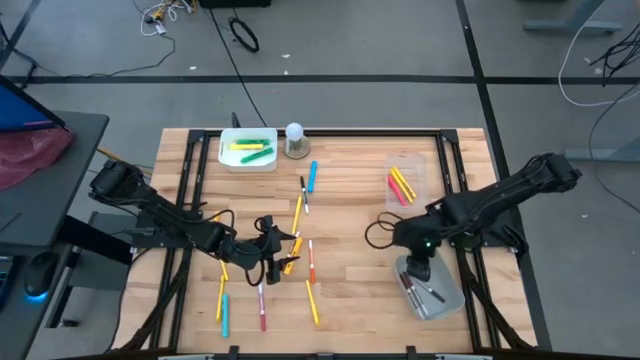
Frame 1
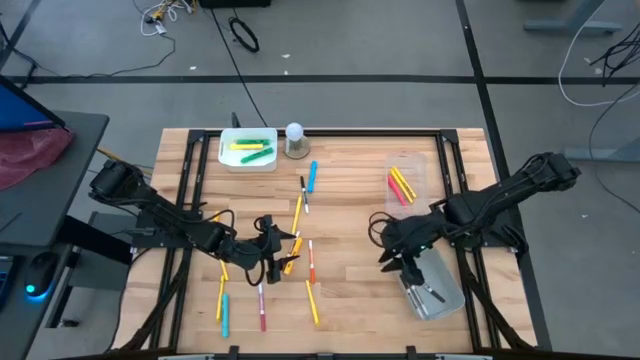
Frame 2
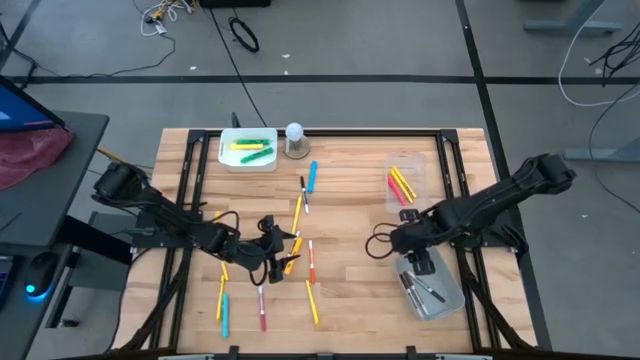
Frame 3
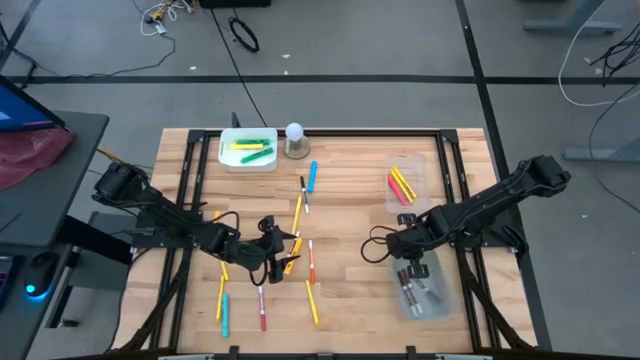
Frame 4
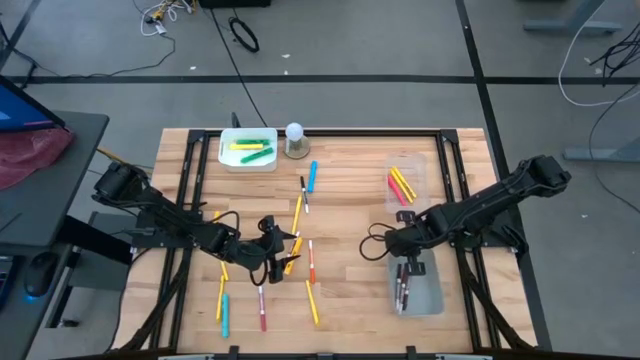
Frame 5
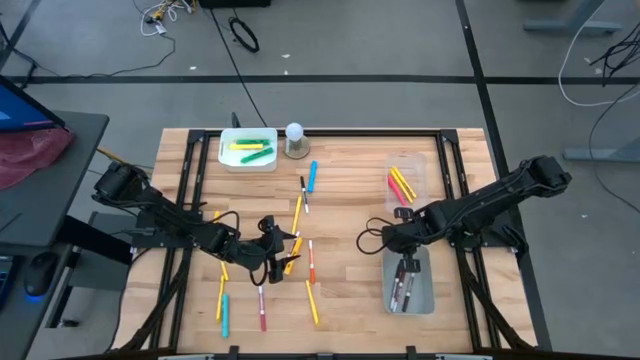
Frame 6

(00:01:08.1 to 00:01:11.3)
Task: Pick & Place Markers
Adjust the gray bin on the table

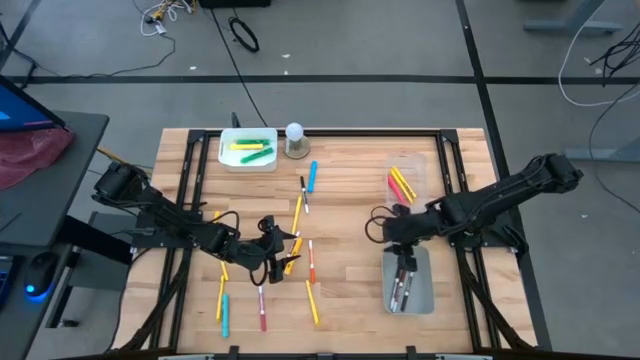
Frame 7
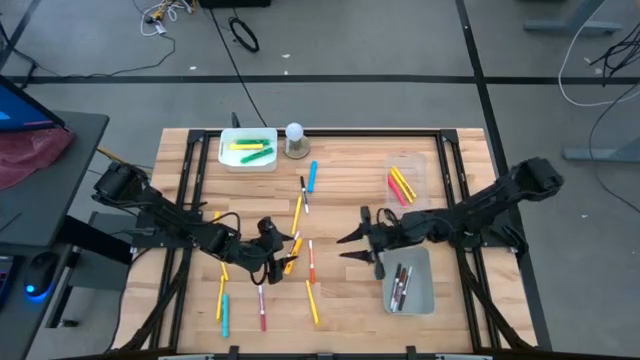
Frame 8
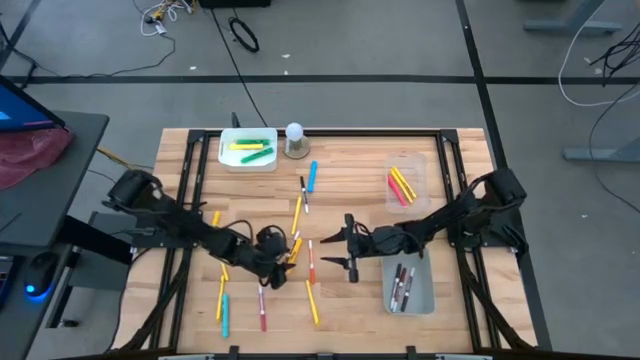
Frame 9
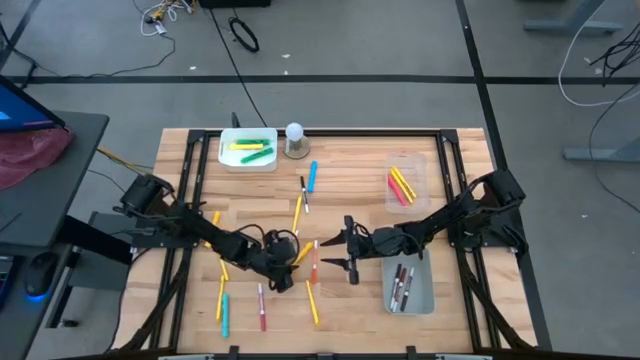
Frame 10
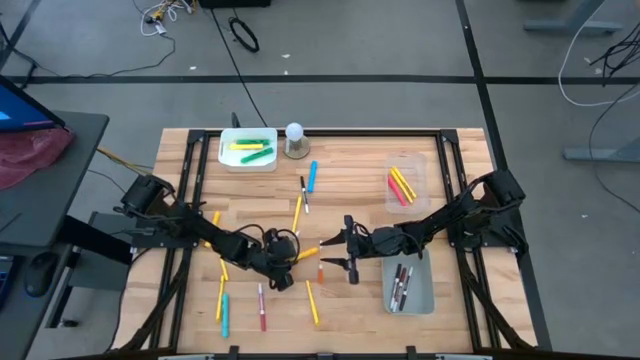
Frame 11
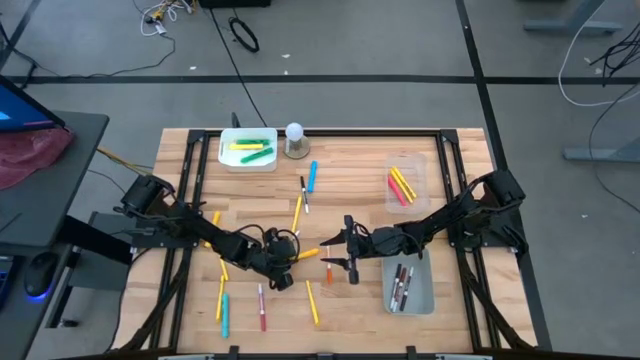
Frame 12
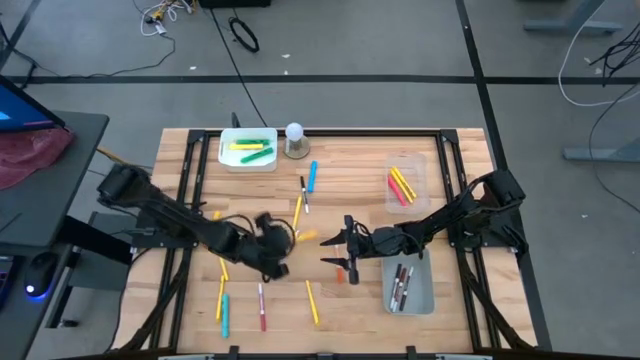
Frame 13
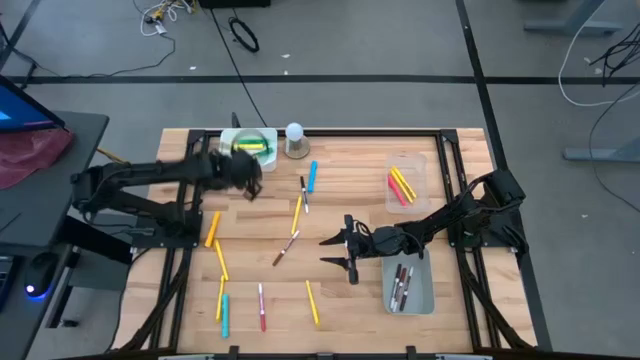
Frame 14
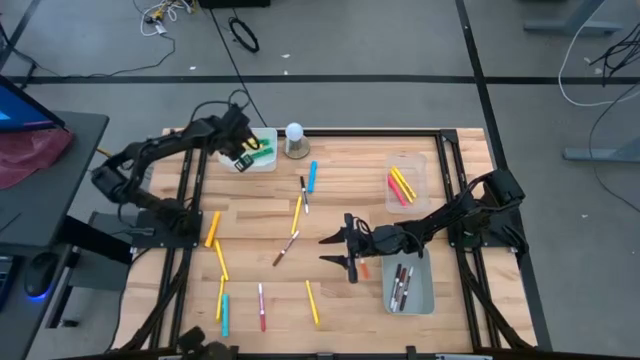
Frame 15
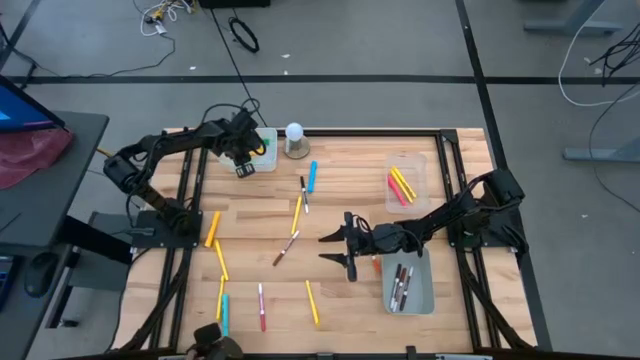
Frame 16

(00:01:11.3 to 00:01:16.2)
Put the yellow highlighter into the white bin

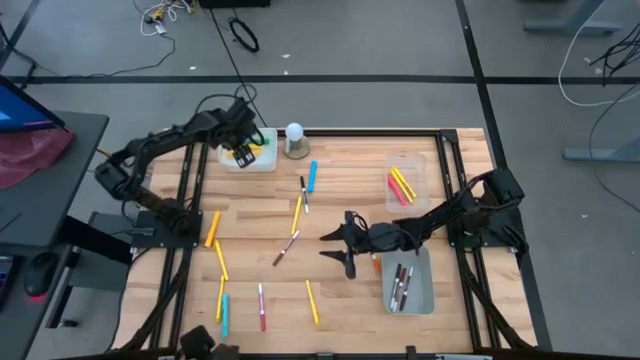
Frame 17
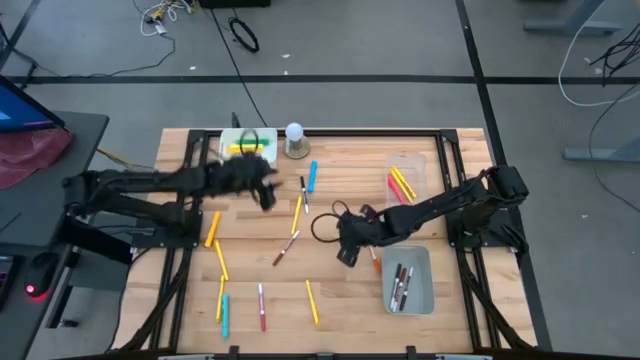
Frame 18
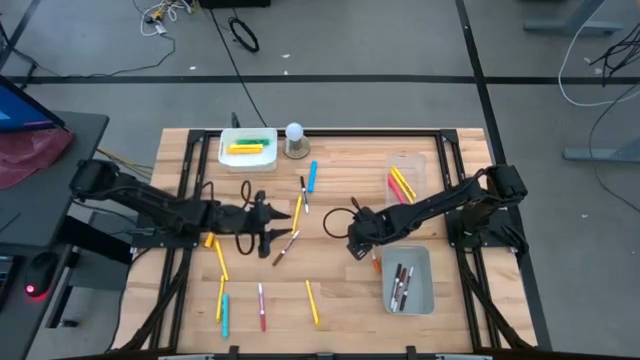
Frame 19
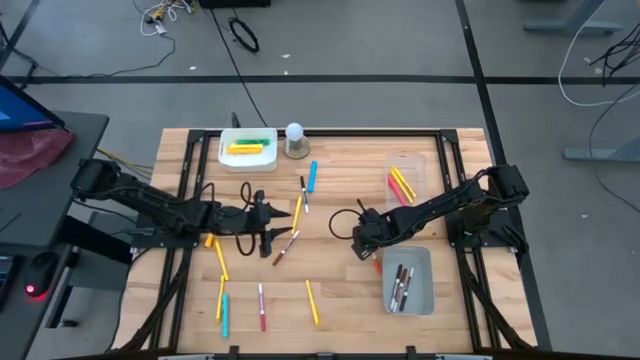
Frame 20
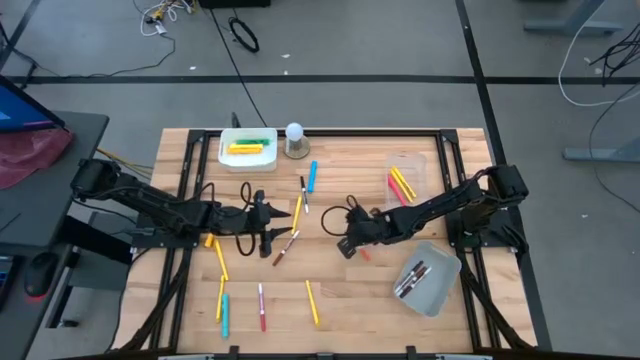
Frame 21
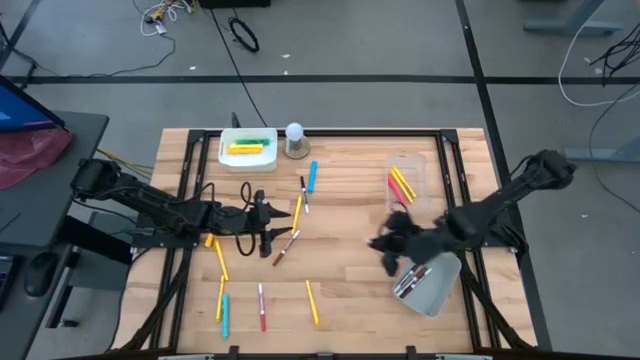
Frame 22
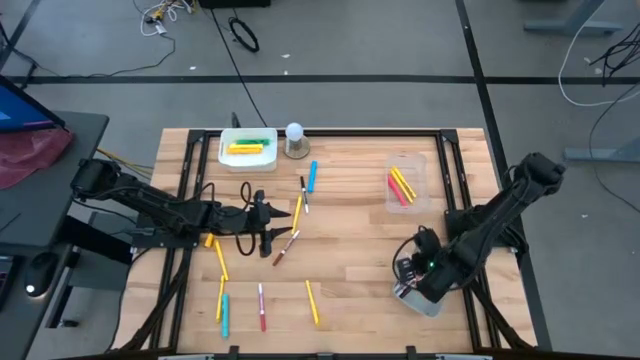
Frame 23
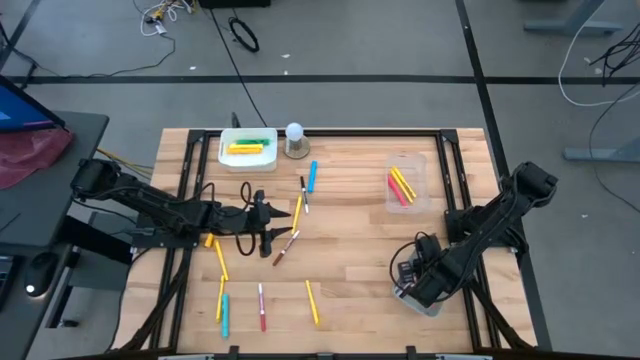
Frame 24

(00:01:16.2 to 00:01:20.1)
Put the orange marker pen into the gray bin

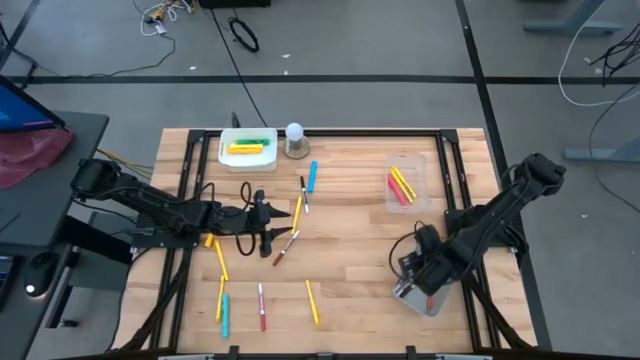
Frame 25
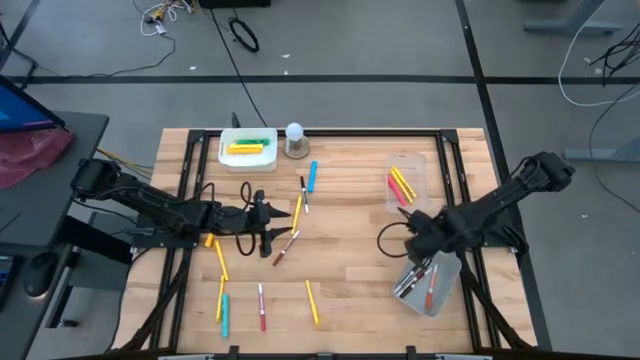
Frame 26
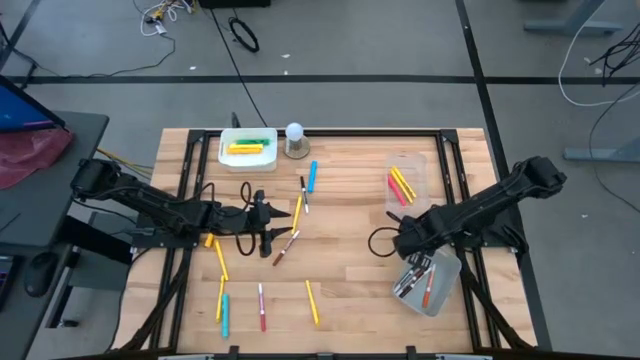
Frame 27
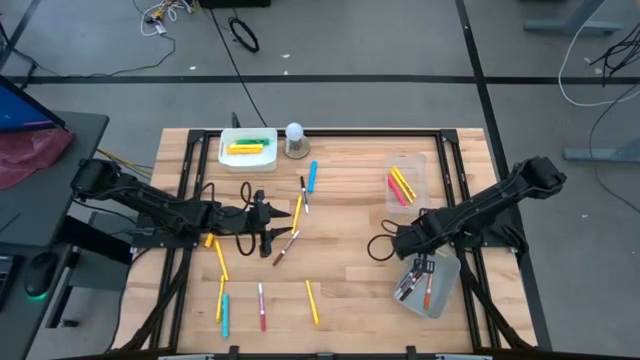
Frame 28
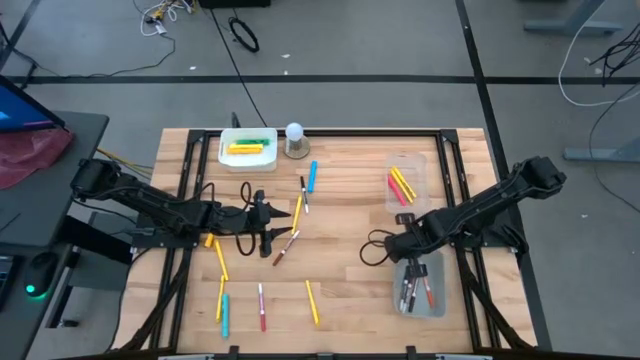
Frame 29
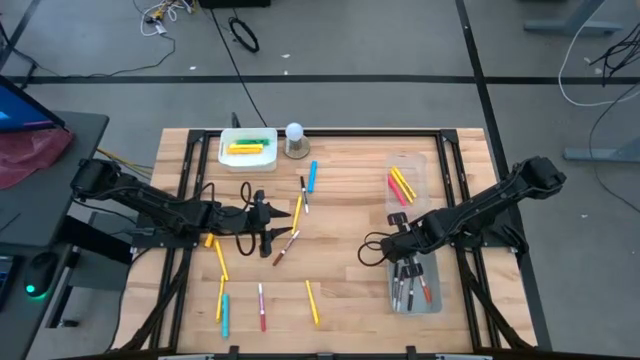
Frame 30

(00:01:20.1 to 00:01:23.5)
Adjust the gray bin on the table

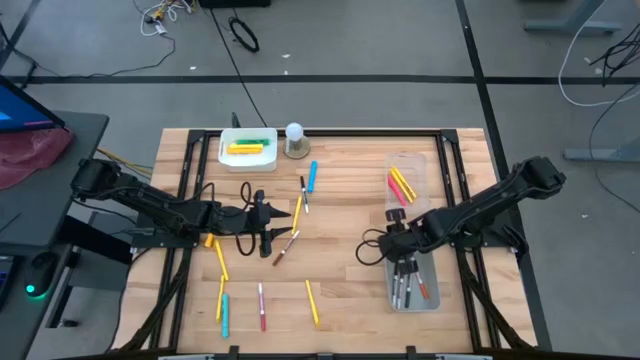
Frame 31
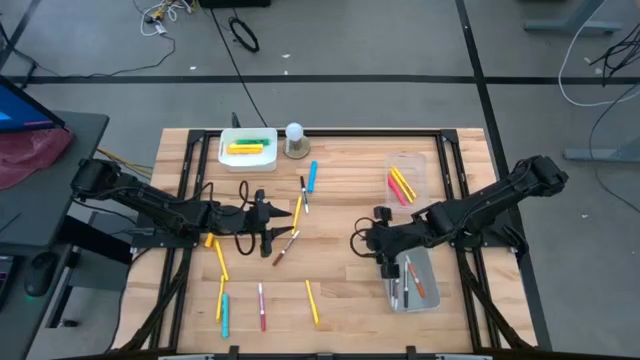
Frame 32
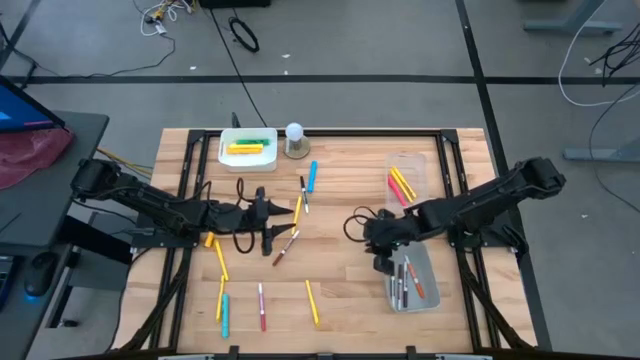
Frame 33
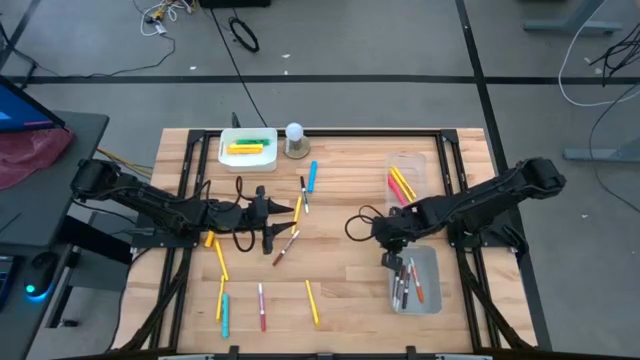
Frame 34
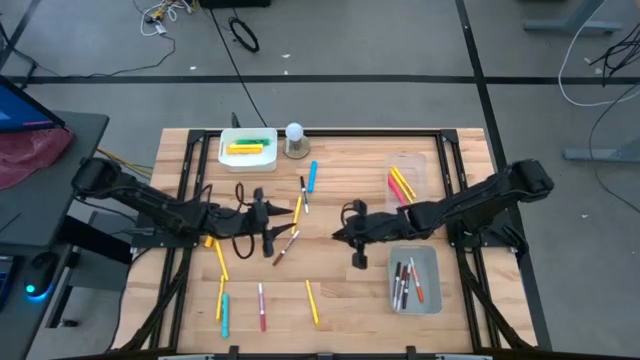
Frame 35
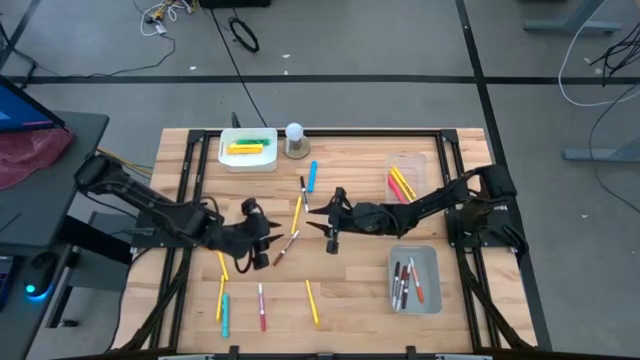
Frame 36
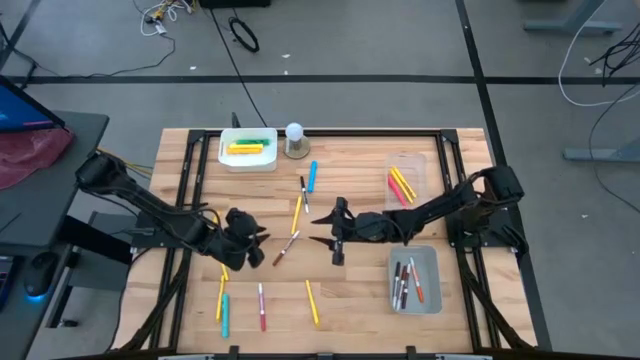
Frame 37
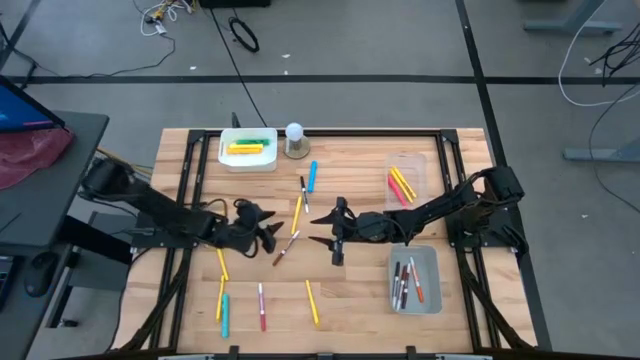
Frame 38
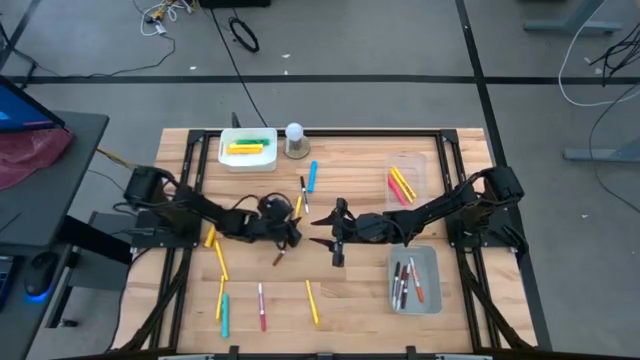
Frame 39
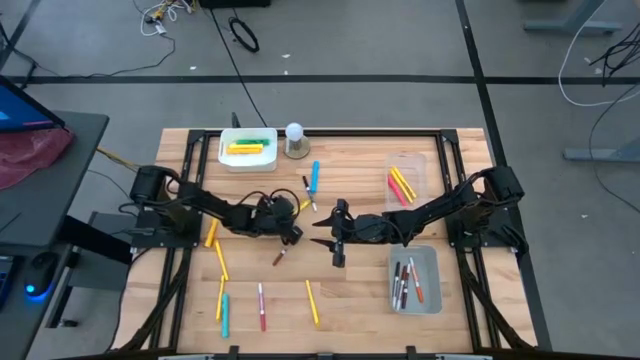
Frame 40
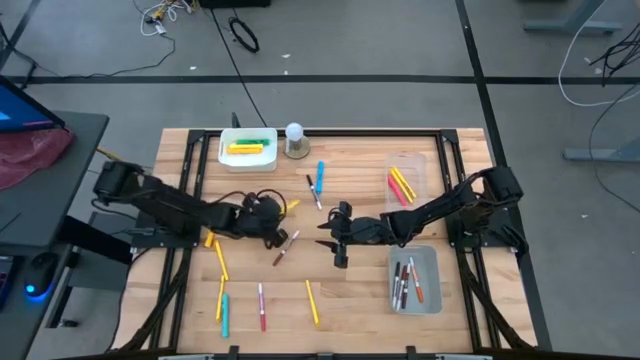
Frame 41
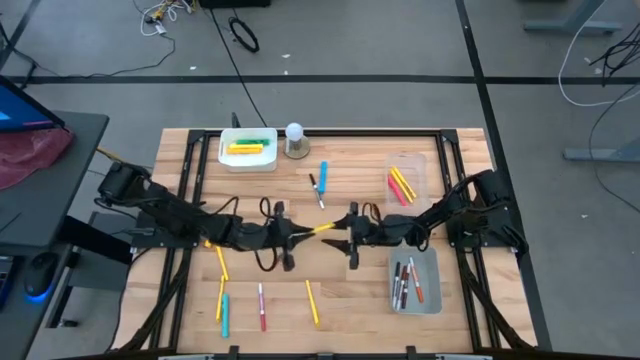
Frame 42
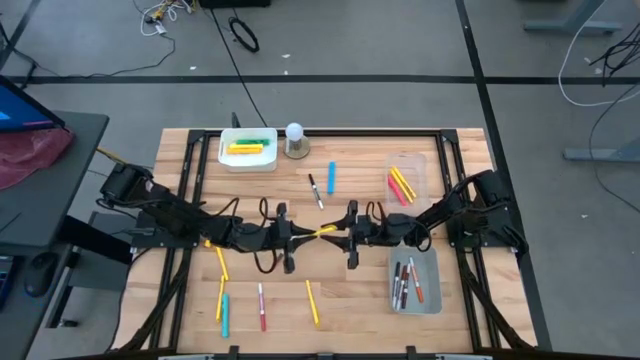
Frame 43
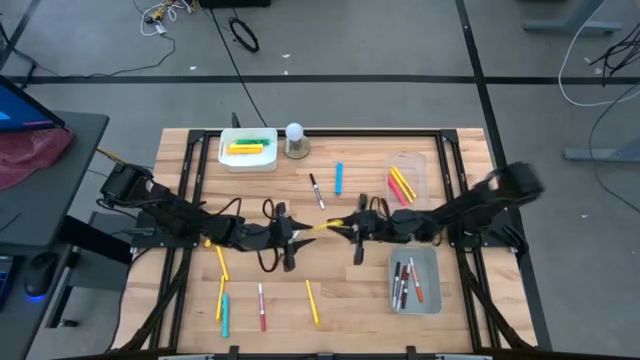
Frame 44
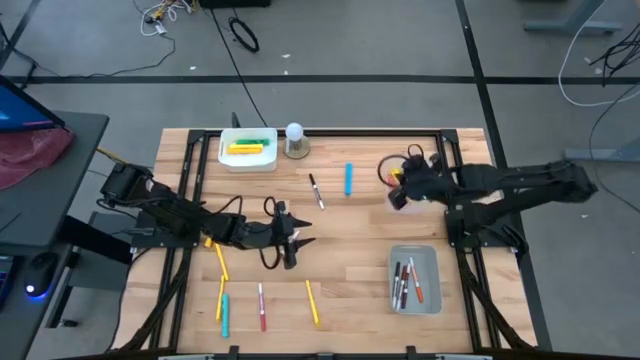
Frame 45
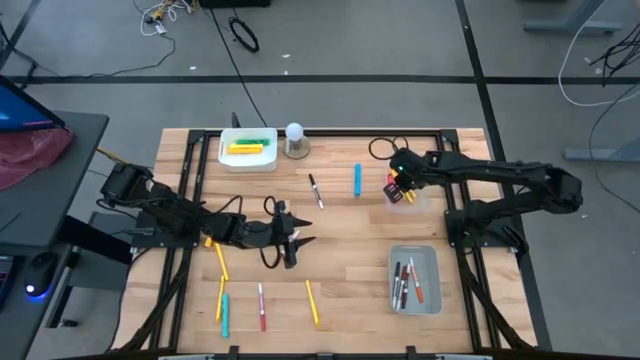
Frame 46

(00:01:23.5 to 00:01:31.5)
Put the yellow pen into the transparent bin
